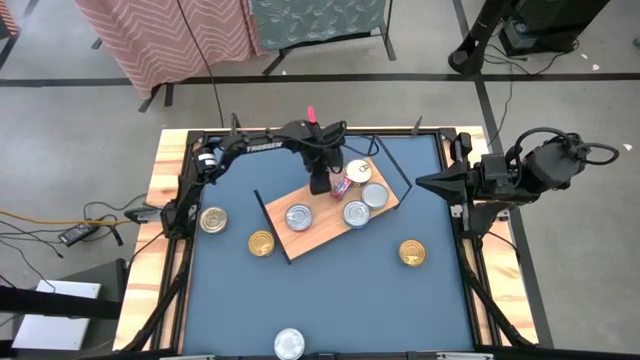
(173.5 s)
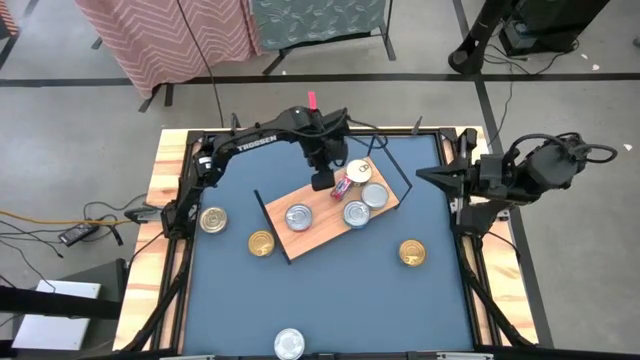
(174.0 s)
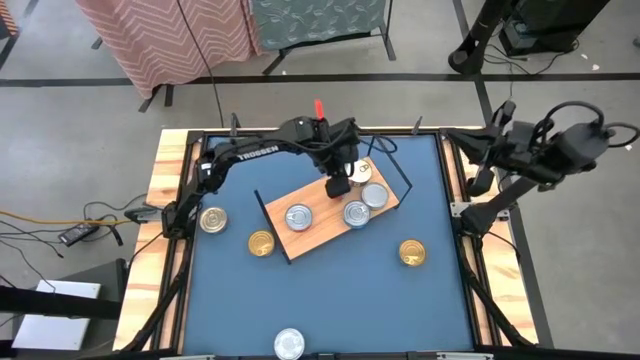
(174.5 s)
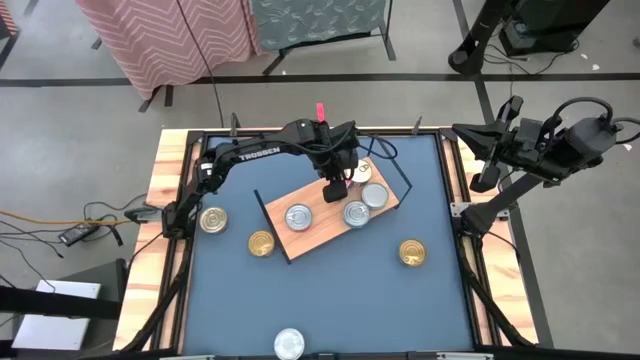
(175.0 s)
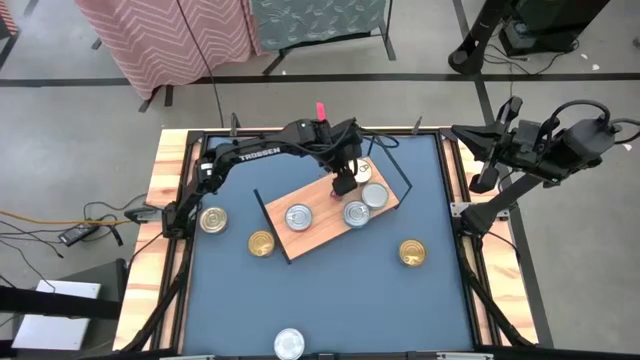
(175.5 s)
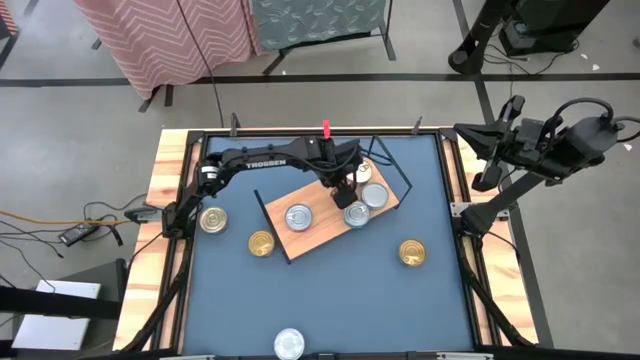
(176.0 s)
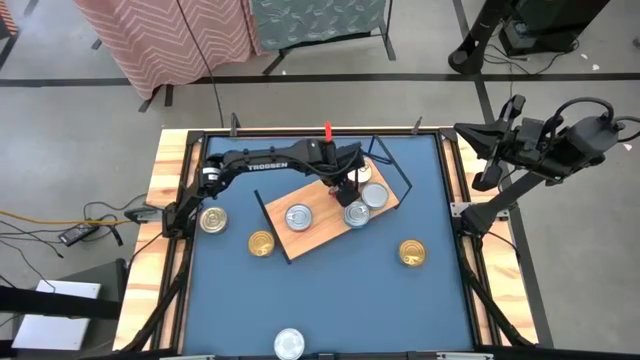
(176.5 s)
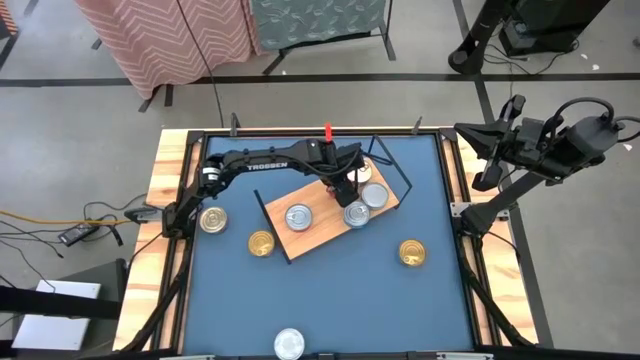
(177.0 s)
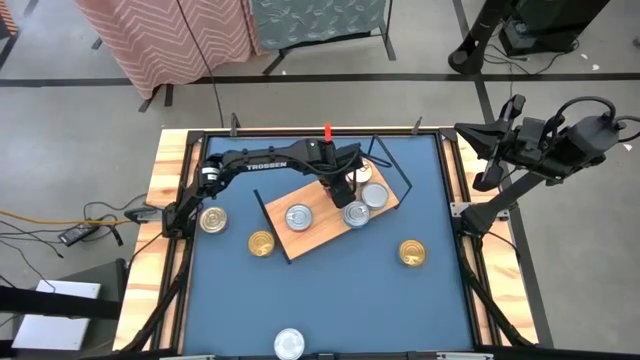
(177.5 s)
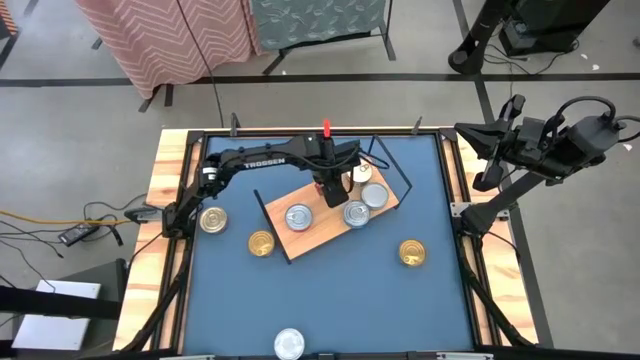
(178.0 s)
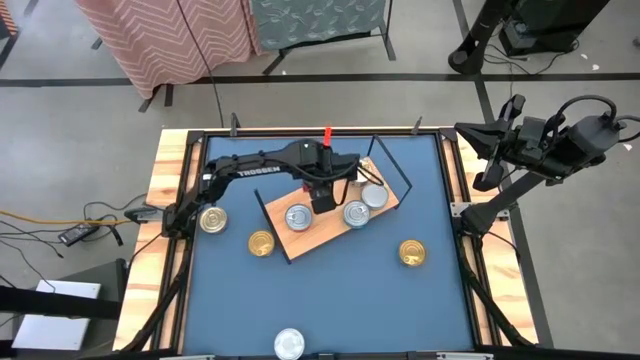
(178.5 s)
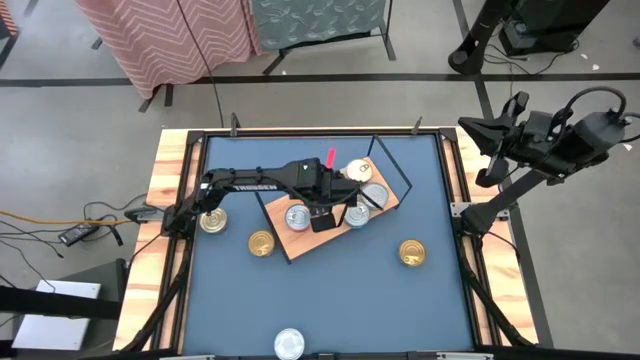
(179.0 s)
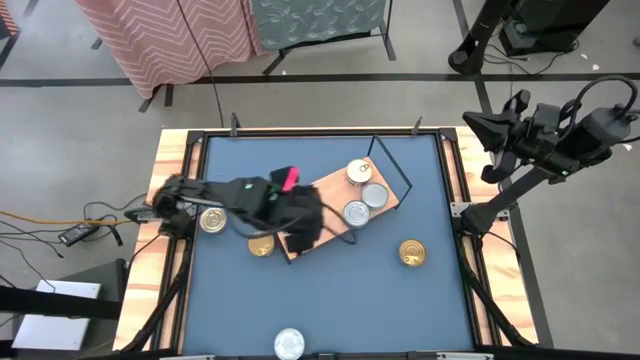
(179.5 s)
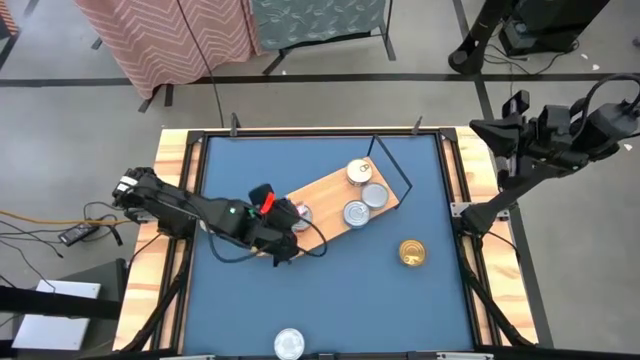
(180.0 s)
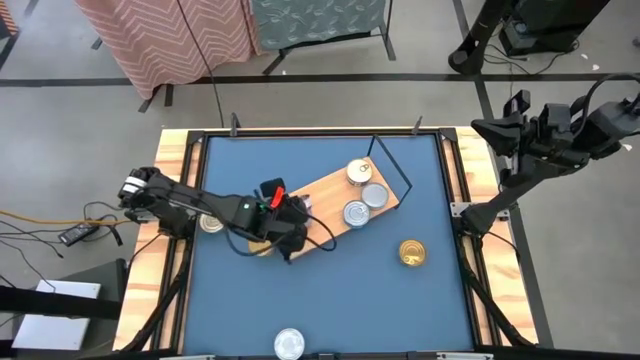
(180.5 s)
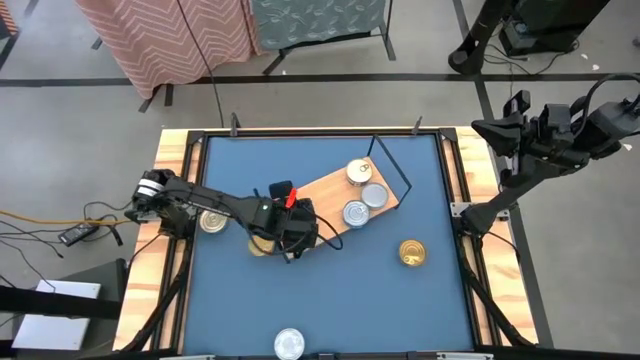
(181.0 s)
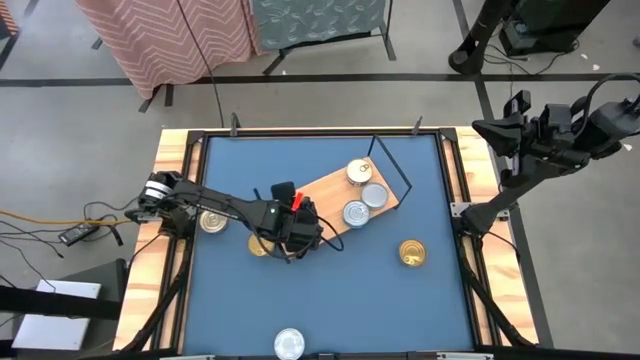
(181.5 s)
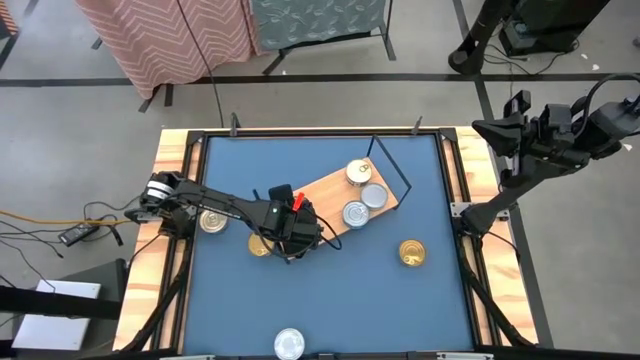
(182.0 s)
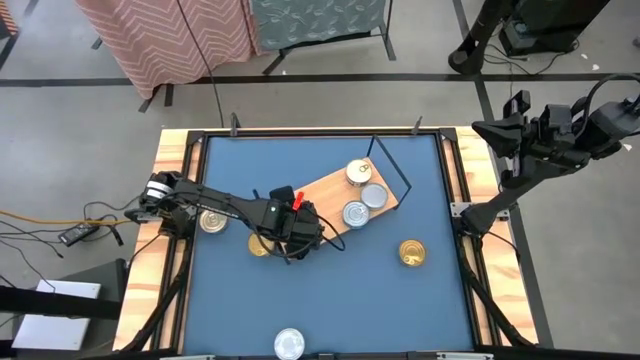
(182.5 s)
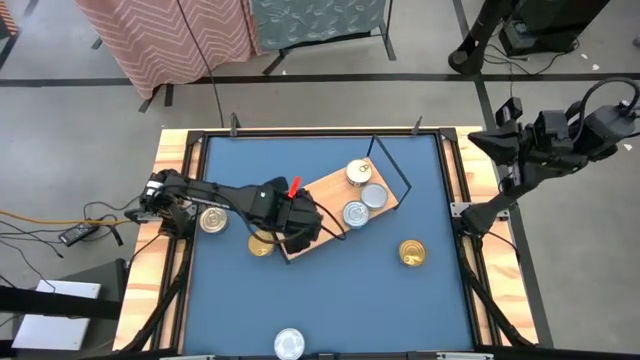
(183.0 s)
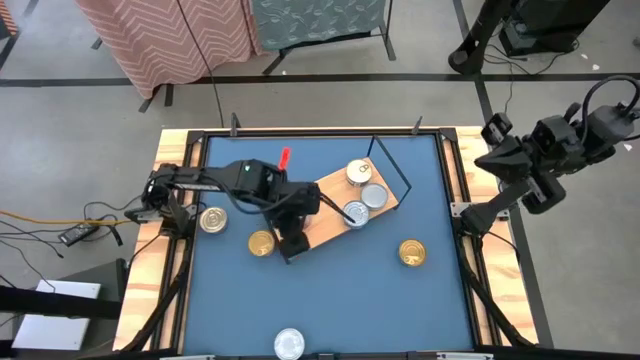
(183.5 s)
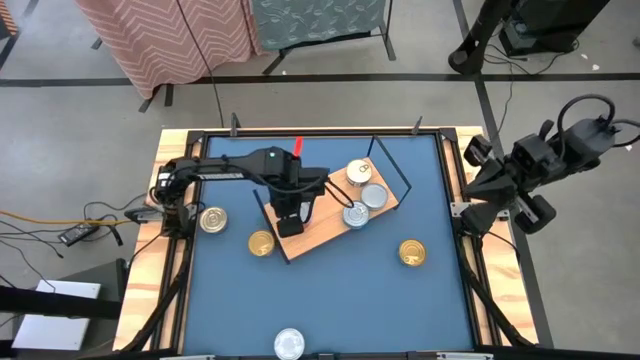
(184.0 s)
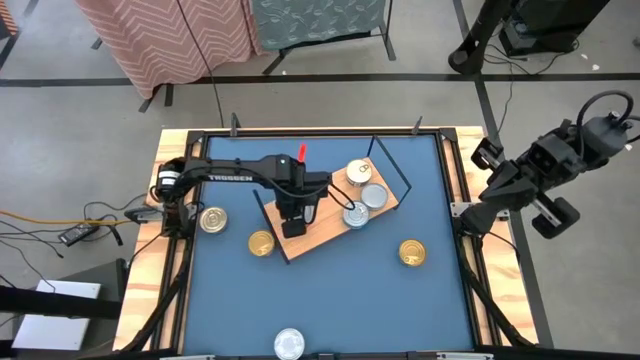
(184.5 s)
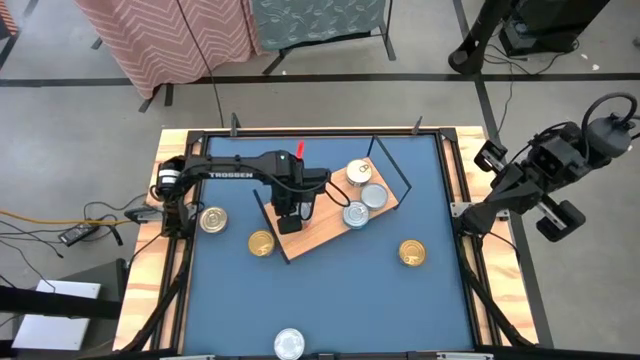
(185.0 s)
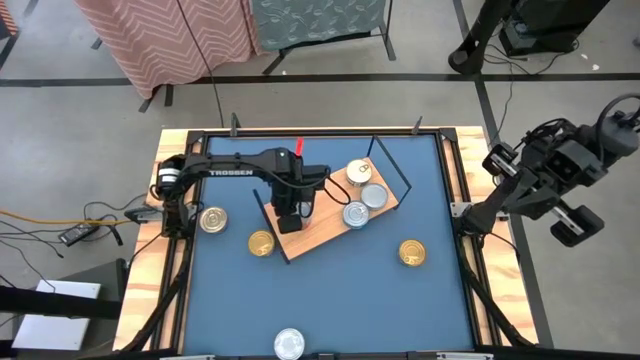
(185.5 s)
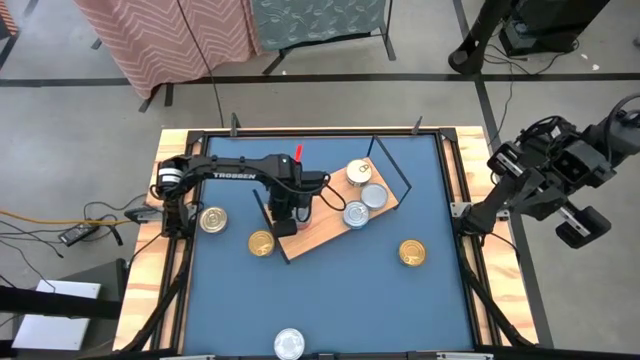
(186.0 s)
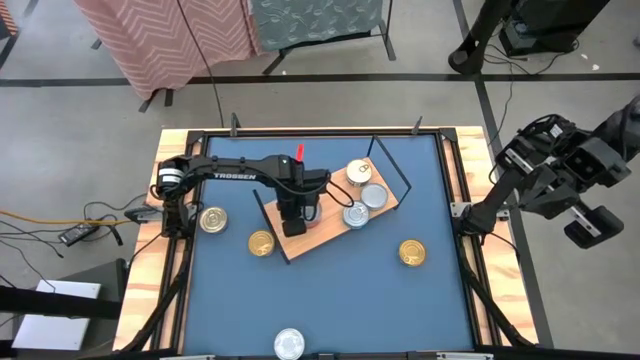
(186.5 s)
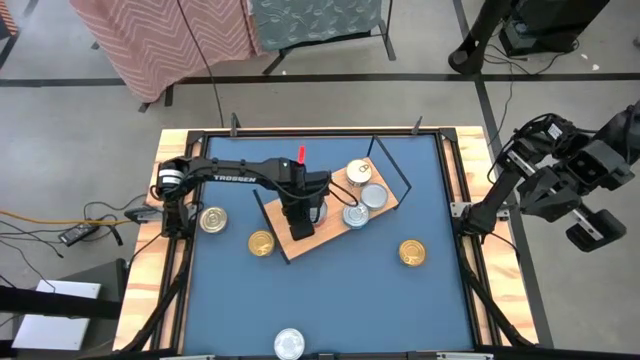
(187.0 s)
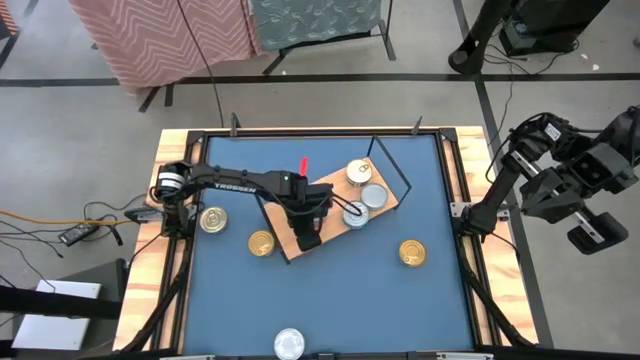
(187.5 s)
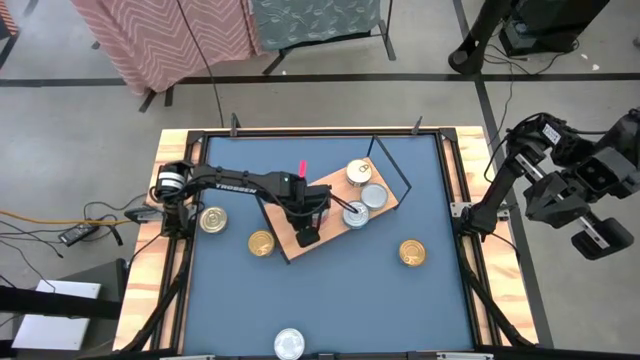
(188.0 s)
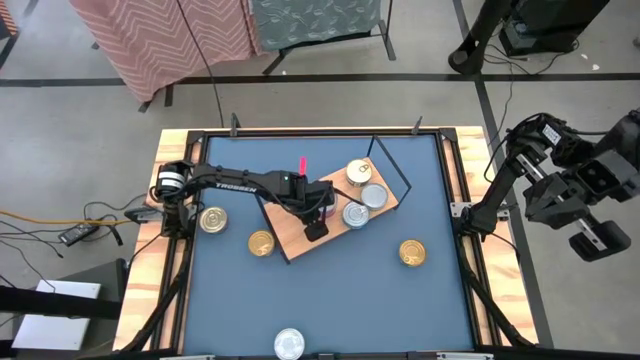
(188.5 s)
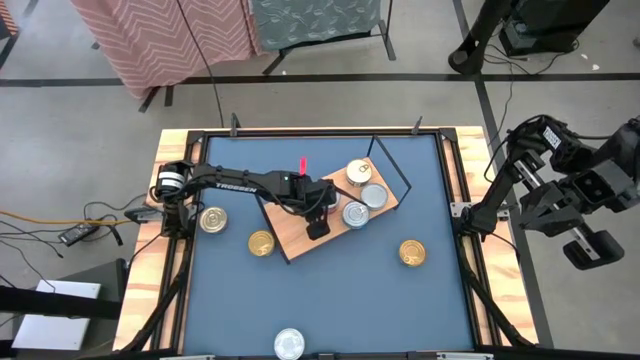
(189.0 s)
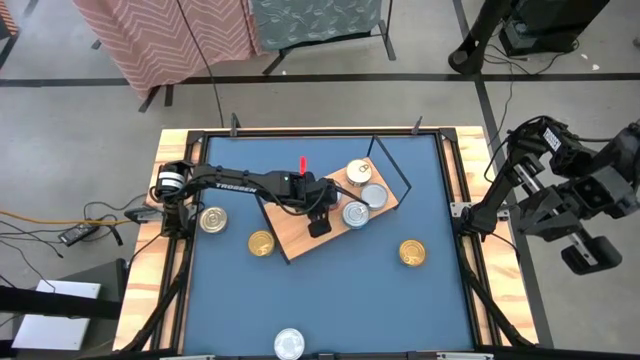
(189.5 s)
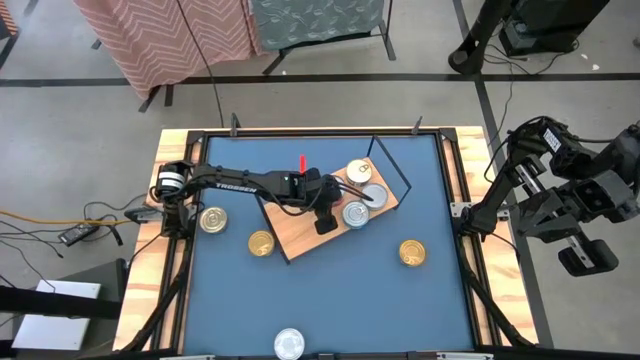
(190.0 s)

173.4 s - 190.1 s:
Task: Stack canned seafood by type on shelf
Stack the red tuna can on top of the red tuna can on the shelf

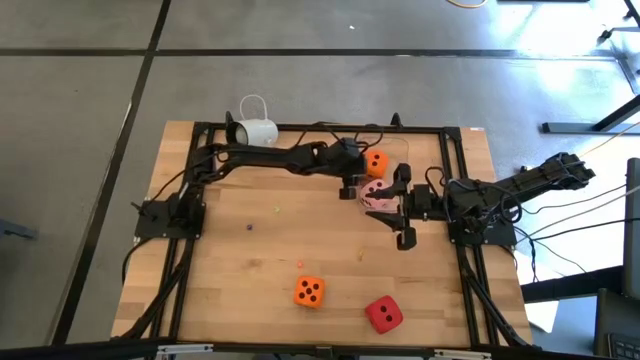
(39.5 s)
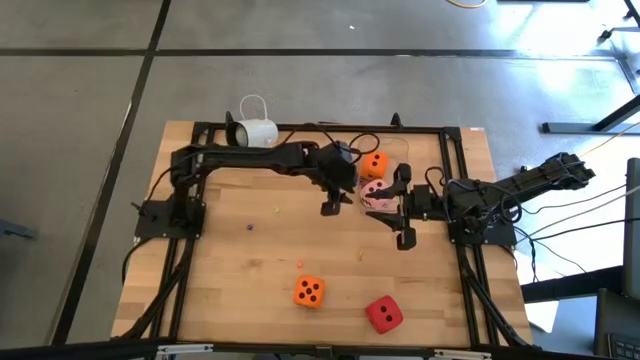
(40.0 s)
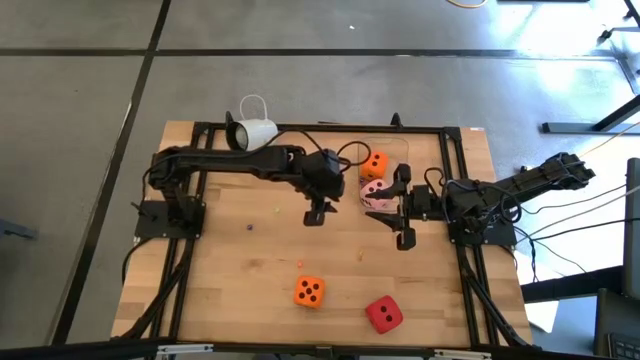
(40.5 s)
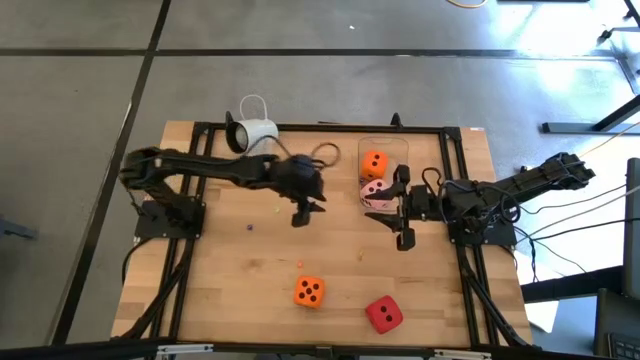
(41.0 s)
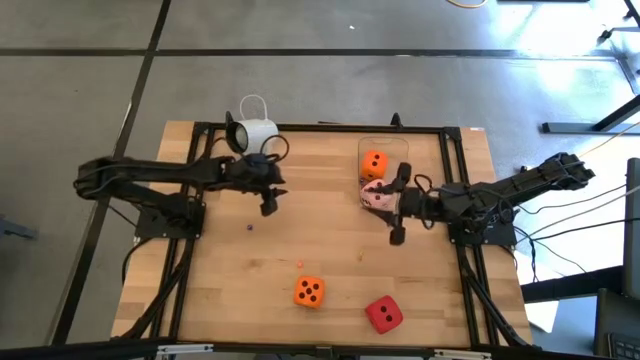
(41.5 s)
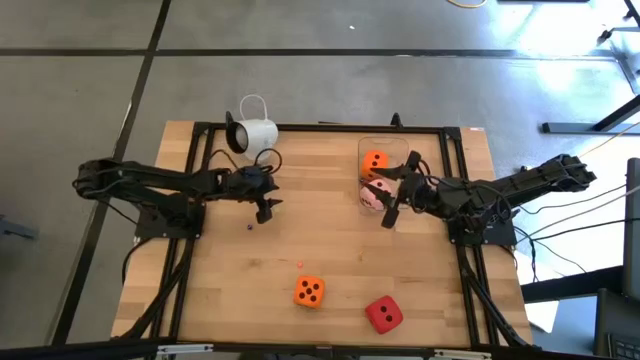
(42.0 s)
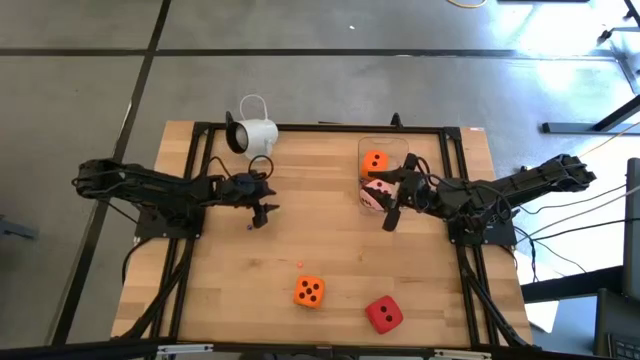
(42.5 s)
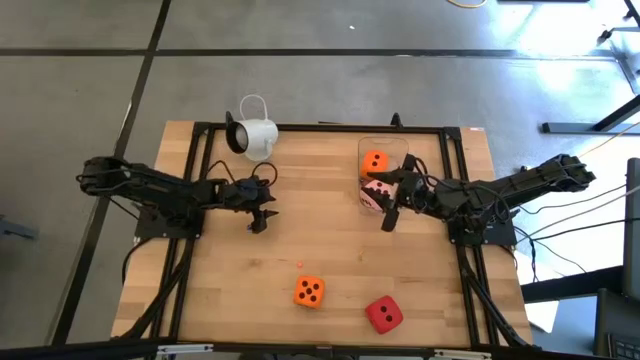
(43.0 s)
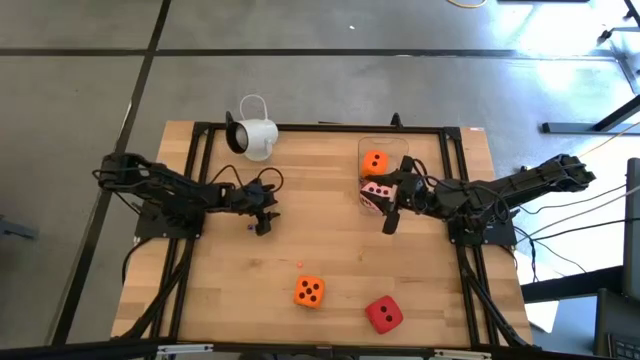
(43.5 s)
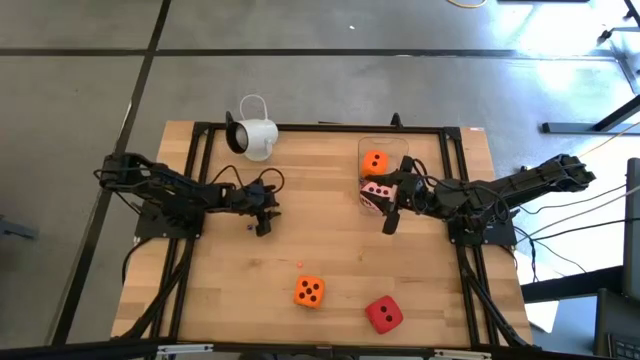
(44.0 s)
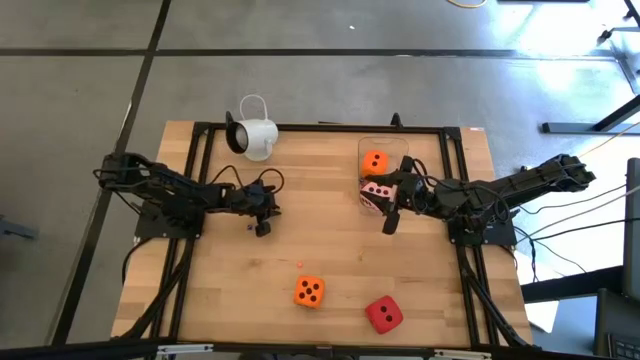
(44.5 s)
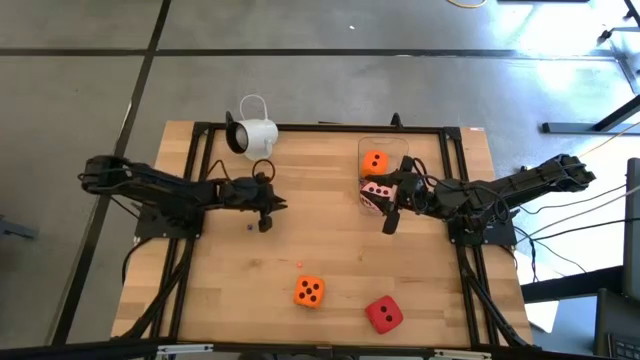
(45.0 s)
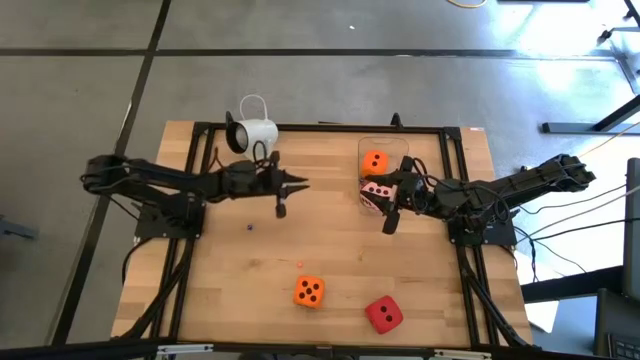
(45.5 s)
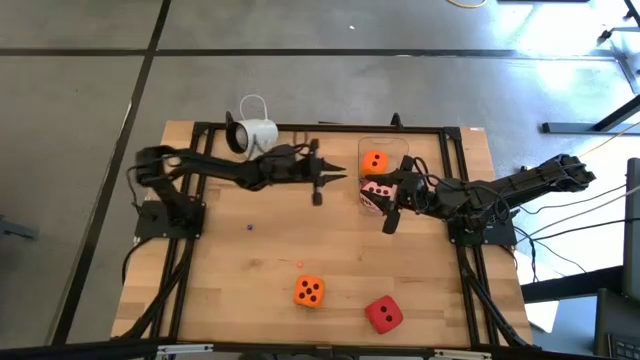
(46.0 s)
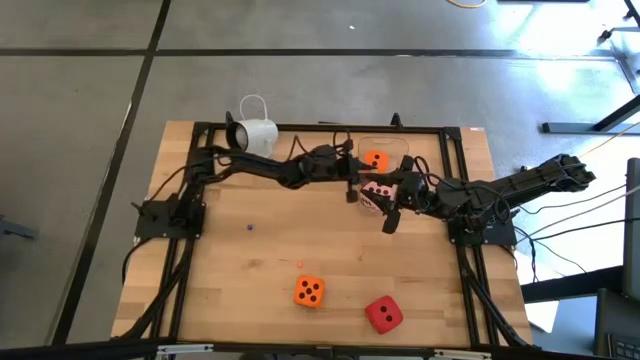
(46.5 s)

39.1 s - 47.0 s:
Task: Pick & Place Dice
Put the small green die into the transparent bin
